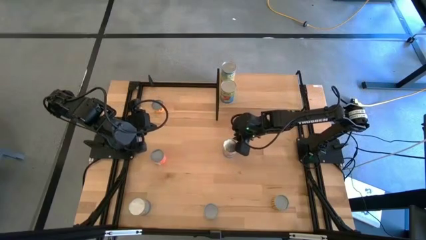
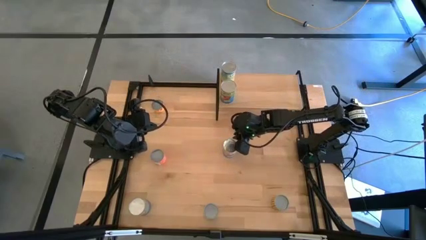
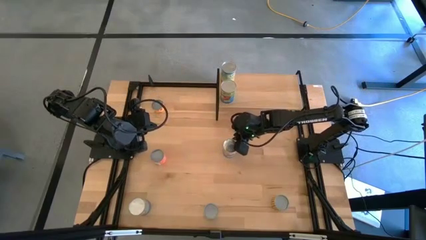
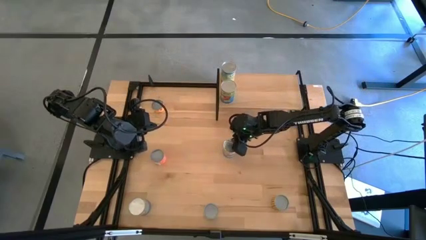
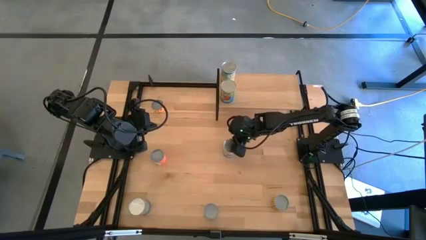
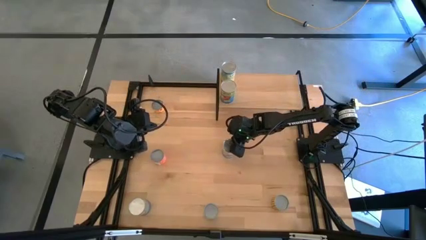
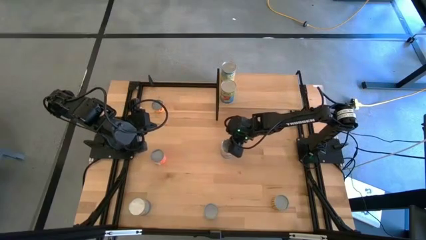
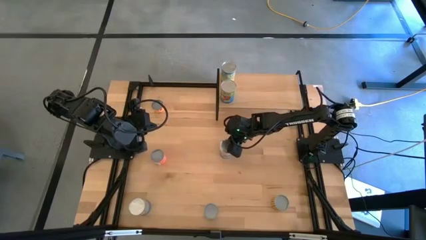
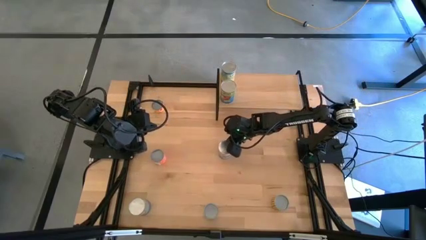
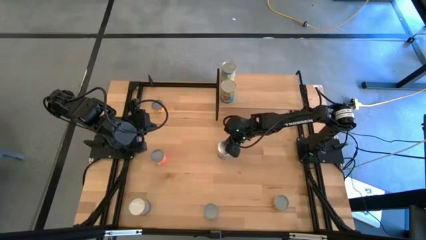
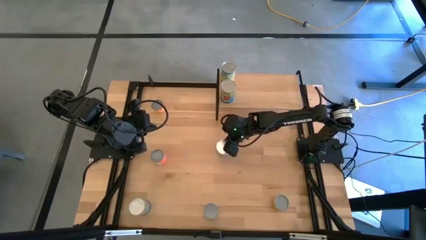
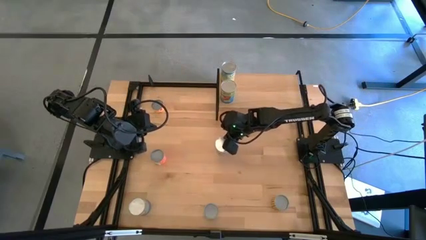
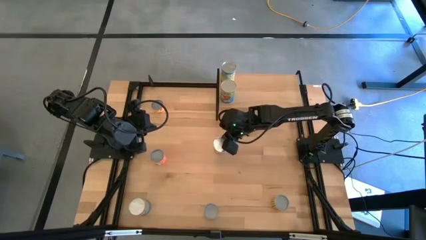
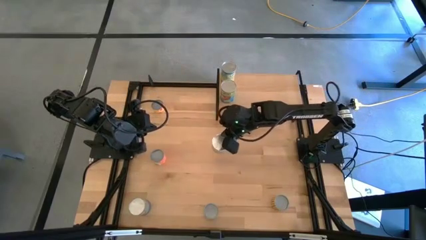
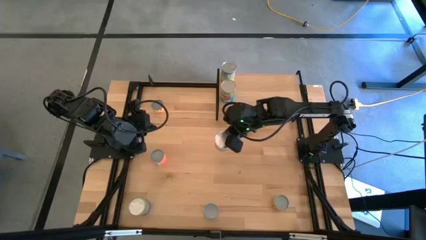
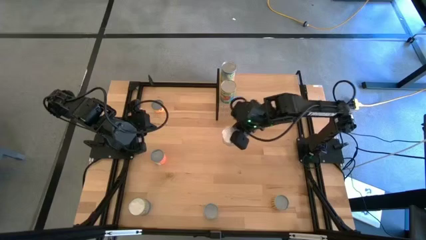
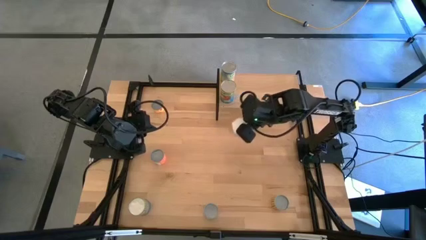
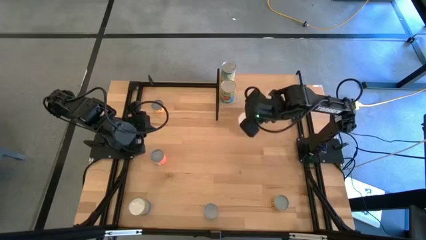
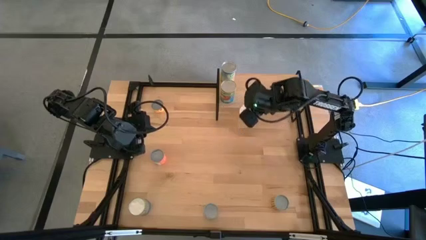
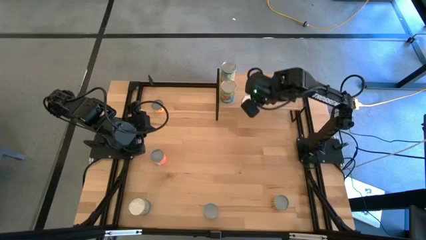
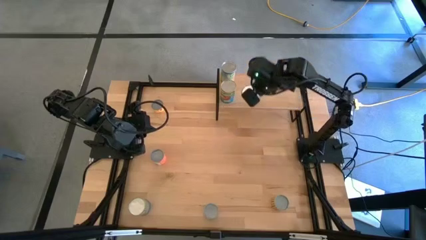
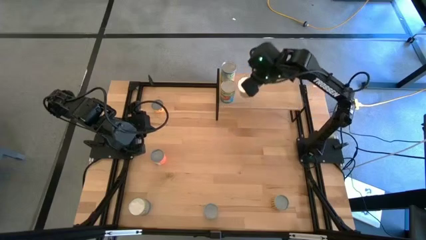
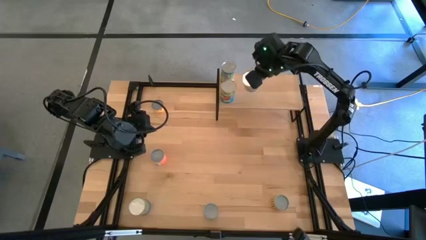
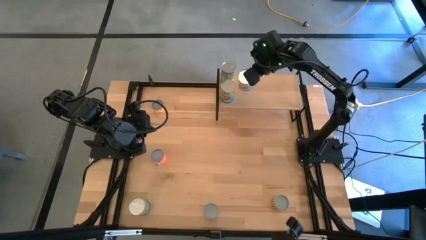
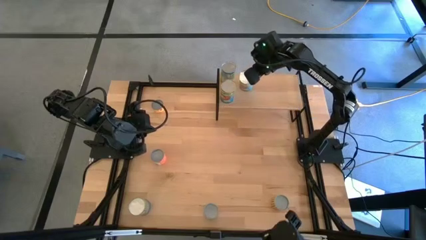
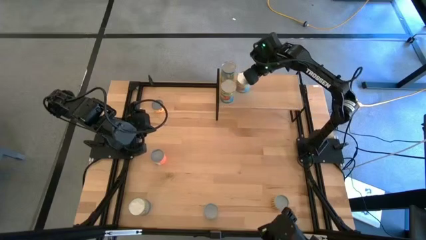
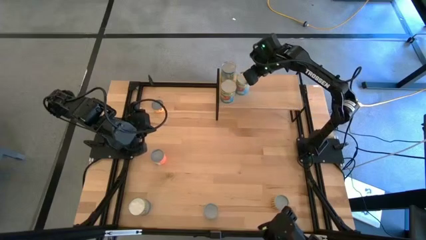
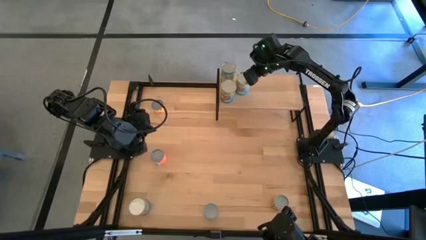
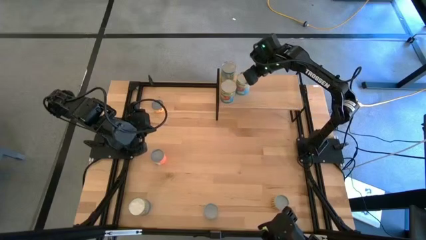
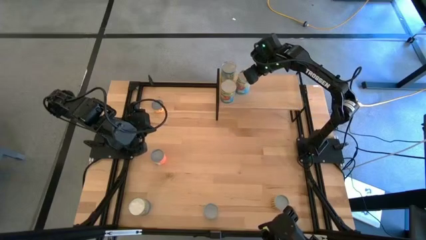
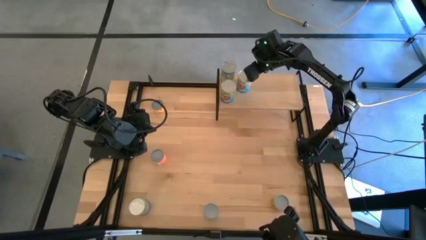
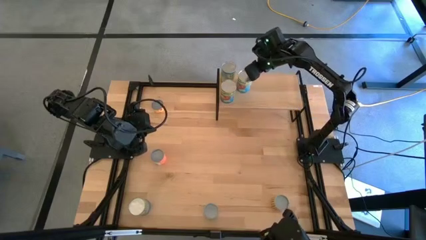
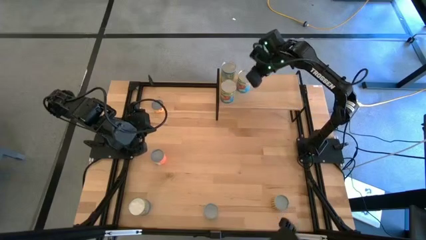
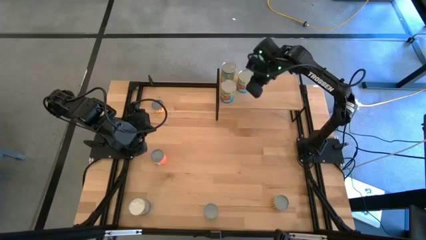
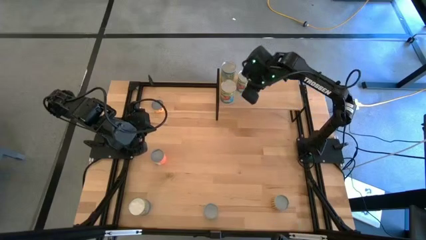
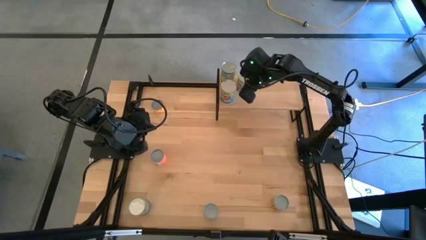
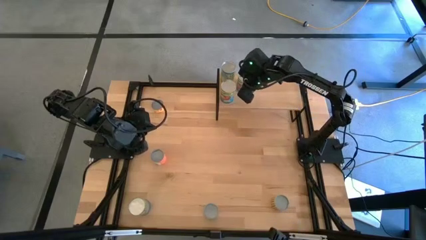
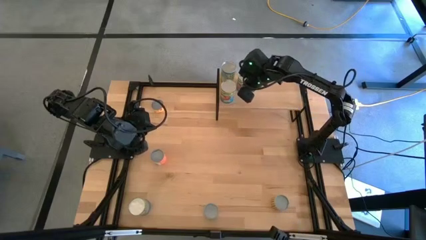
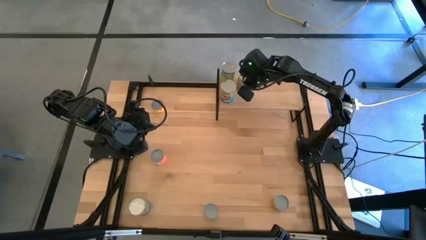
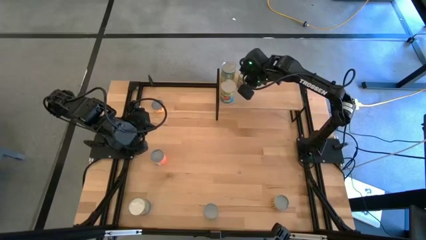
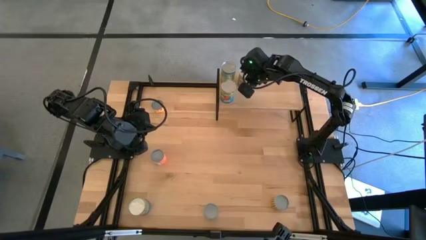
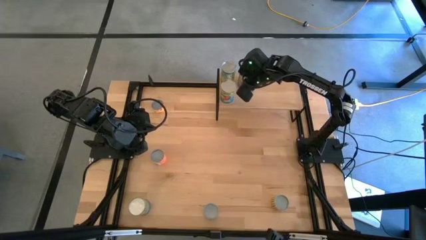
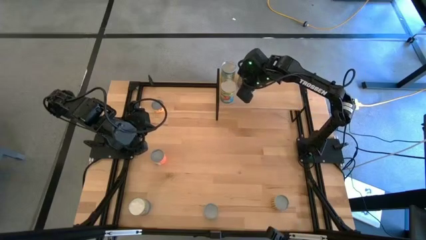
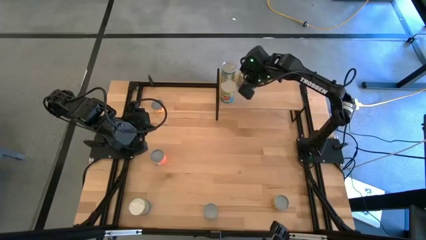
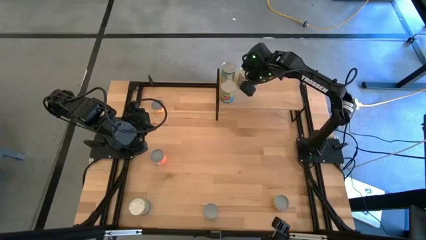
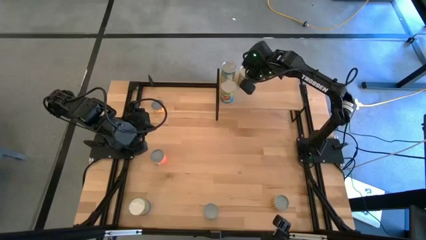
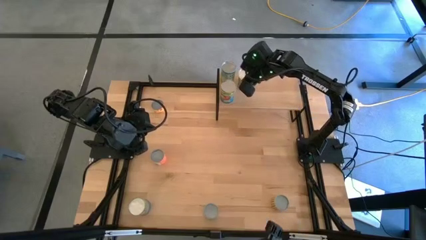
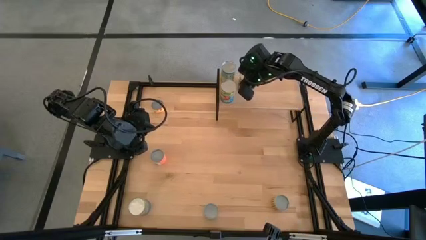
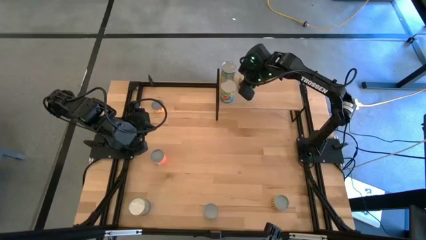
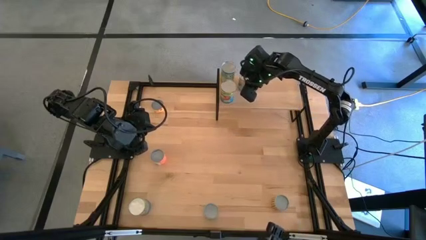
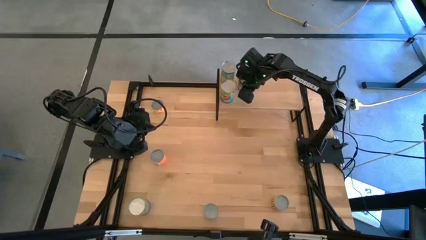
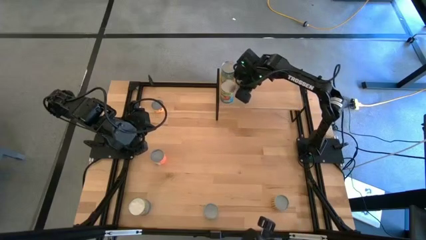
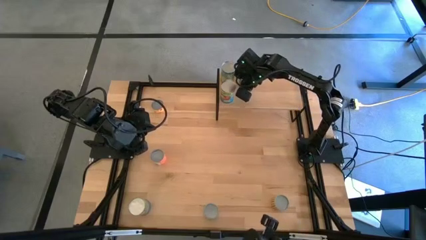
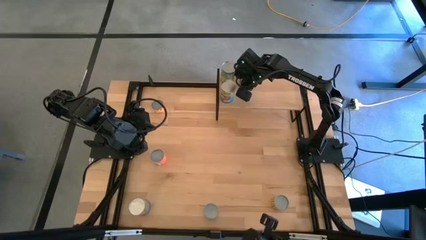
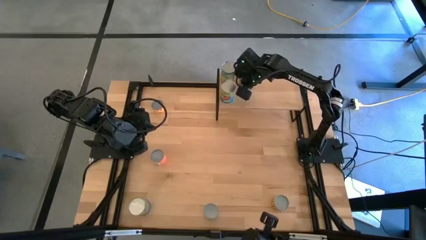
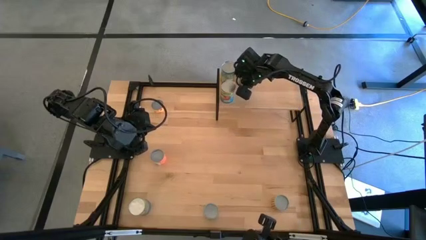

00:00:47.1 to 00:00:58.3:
Task: Pick and place cans onto a shelf
Put the canned tomatoes on the shelf
